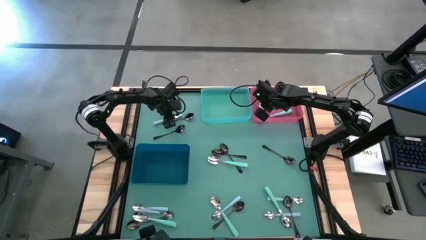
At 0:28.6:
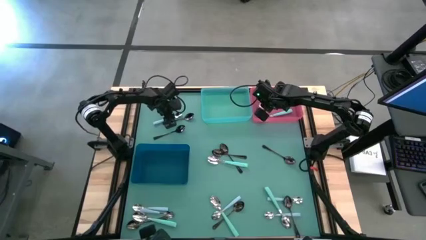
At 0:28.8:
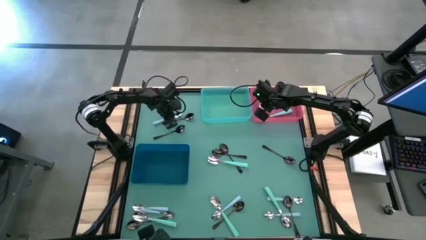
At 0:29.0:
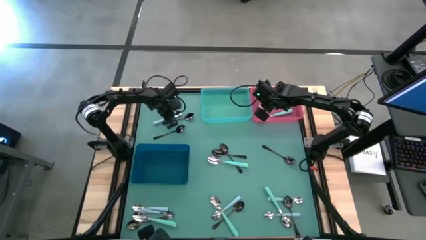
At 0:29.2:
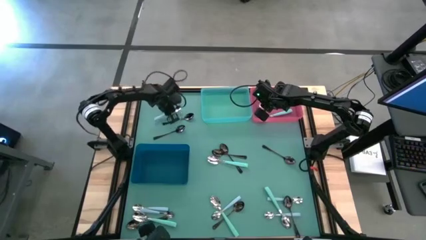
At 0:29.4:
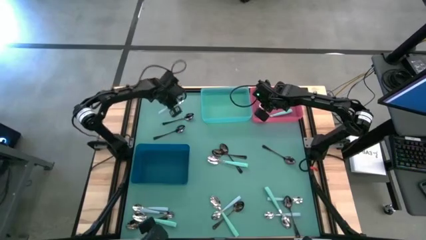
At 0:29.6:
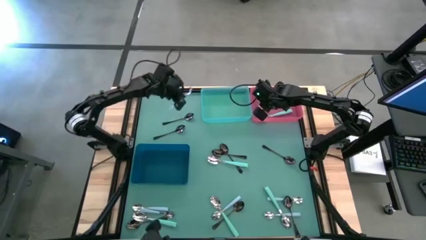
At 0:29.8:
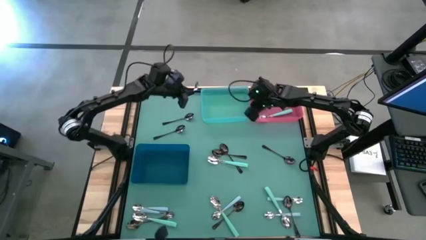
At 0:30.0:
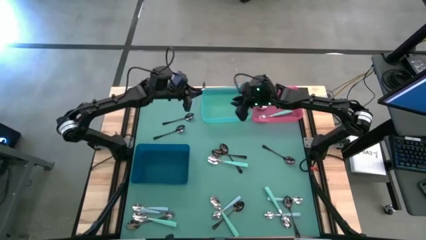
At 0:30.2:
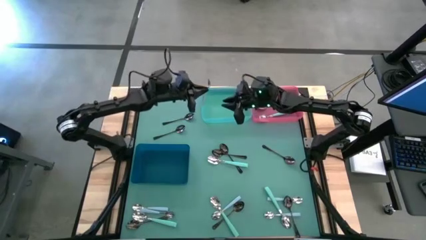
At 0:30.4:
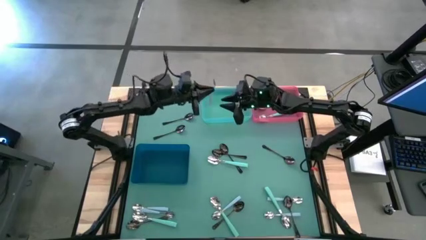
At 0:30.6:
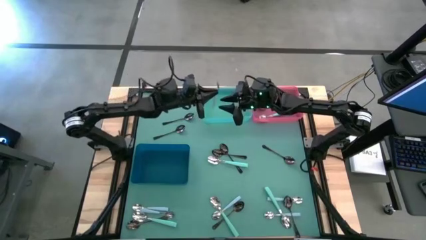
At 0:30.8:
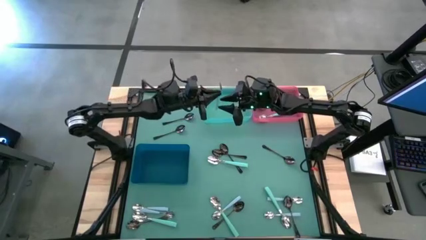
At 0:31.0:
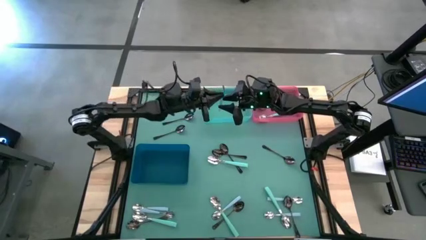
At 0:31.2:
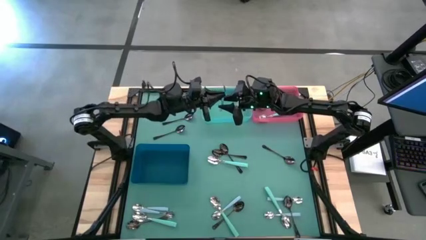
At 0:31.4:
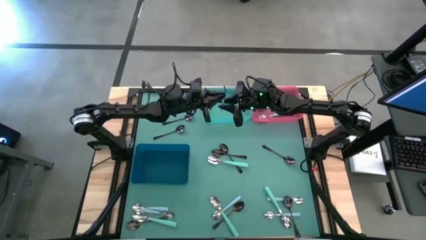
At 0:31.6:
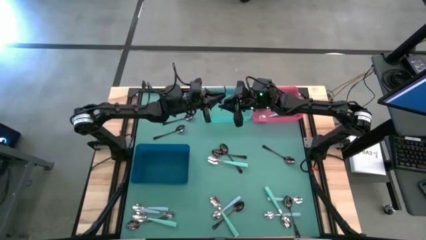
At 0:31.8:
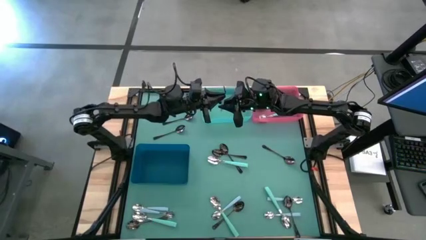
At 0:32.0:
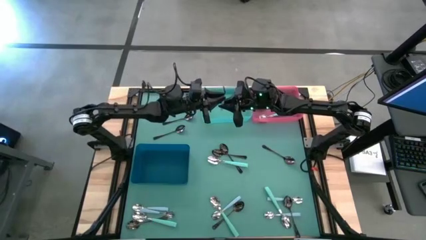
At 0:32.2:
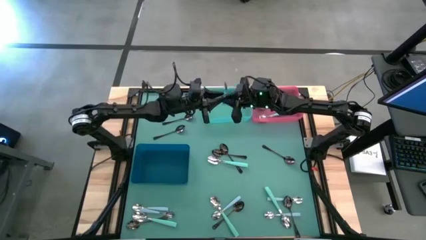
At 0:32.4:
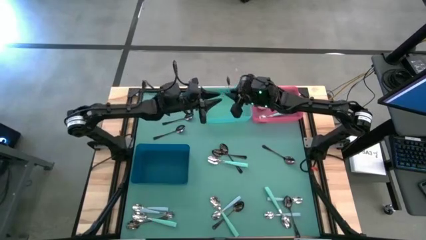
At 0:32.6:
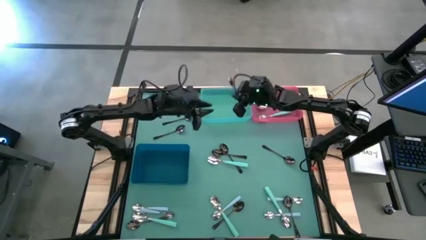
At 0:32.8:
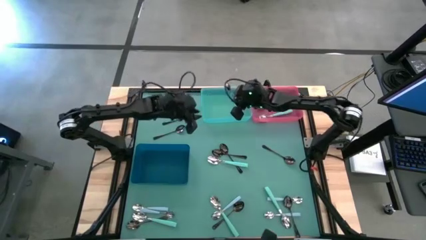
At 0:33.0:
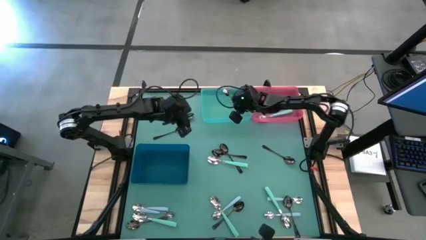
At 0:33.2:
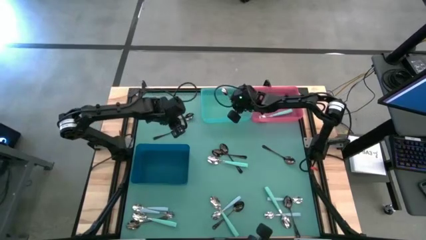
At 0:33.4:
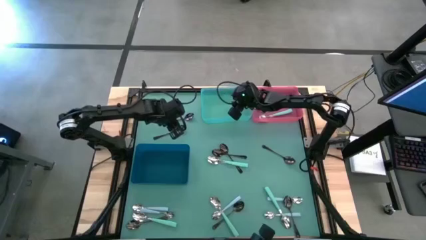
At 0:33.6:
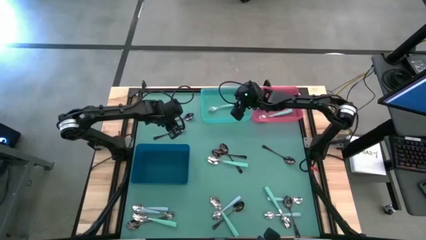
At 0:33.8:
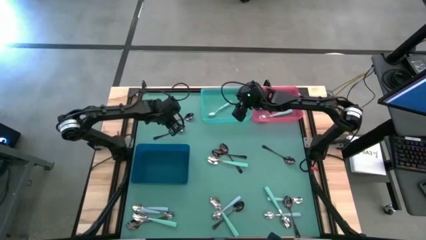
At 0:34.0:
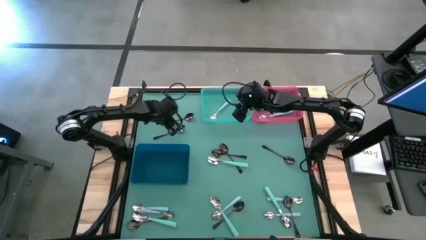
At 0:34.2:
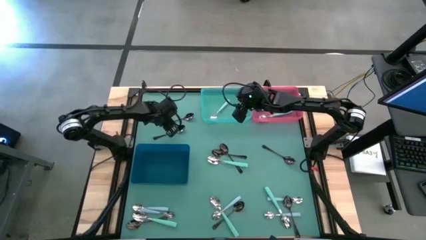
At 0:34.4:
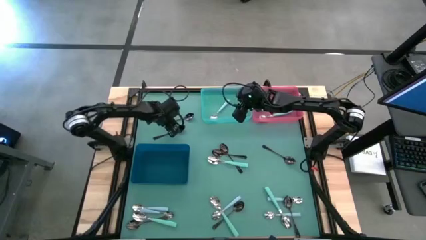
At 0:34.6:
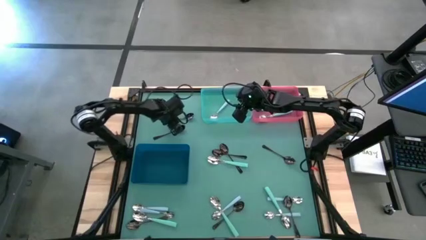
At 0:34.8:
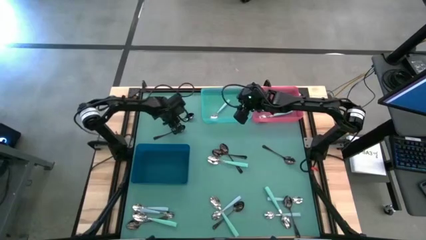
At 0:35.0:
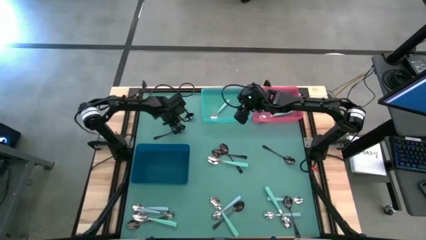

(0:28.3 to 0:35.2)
Task: Sort silverware by color (type)
Put the top left blue spoon into the light blue bin

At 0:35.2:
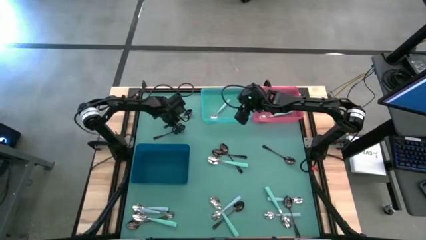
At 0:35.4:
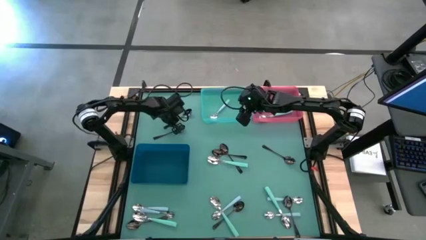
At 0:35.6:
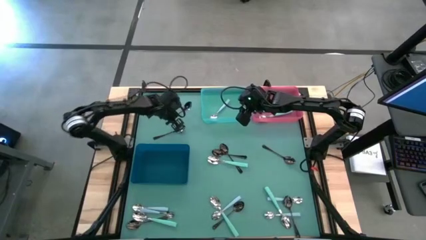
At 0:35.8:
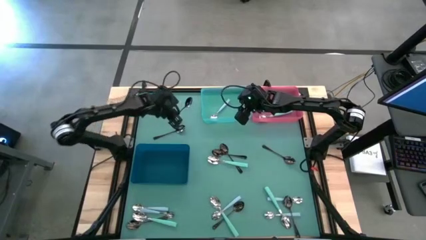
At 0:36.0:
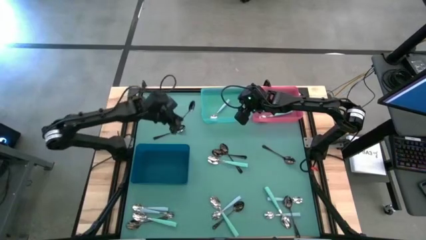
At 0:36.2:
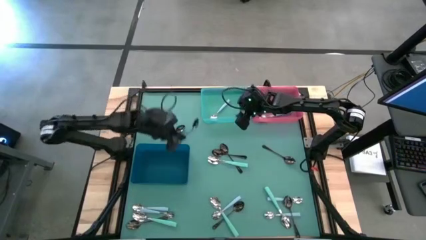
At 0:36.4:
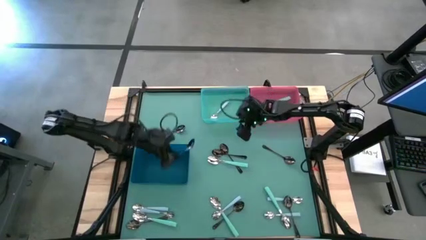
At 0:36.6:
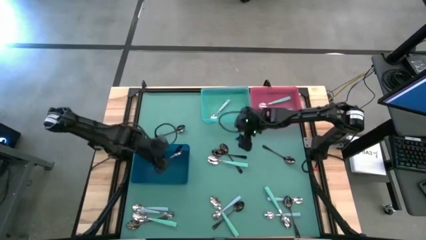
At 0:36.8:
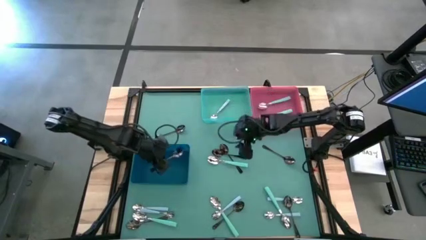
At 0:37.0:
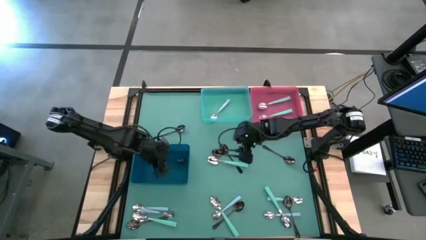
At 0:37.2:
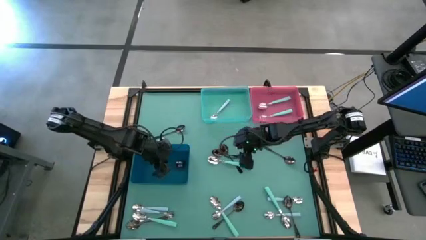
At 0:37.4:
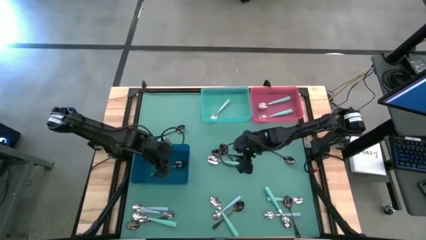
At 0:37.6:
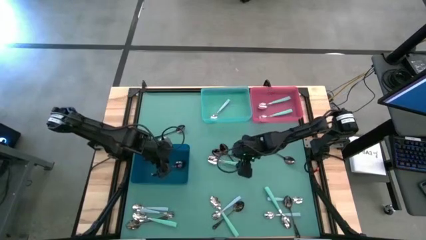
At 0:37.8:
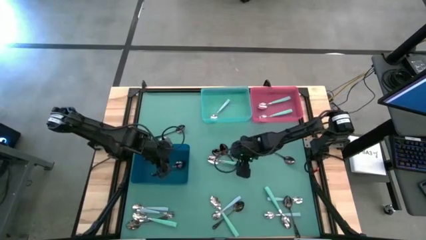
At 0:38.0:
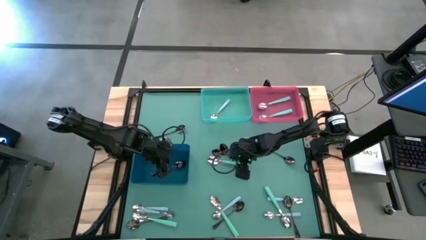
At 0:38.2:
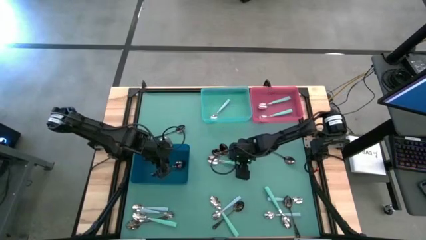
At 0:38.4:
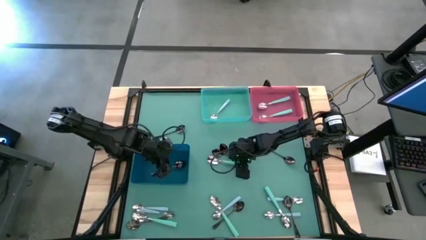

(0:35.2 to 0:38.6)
Put the top left black spoon into the dark blue bin

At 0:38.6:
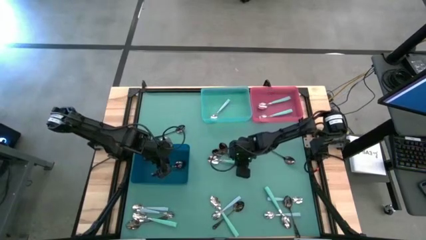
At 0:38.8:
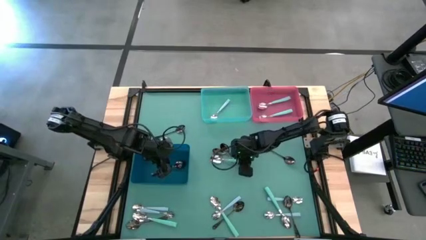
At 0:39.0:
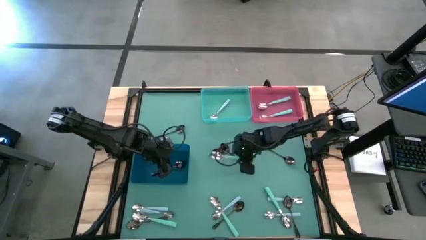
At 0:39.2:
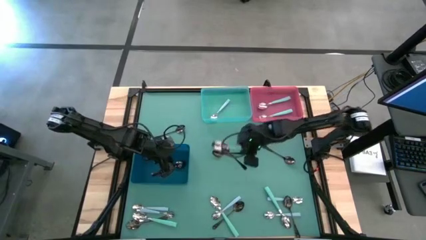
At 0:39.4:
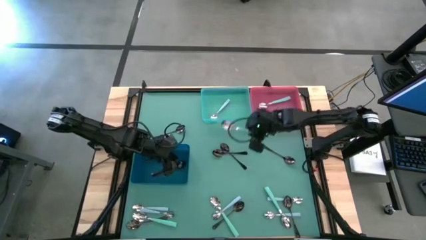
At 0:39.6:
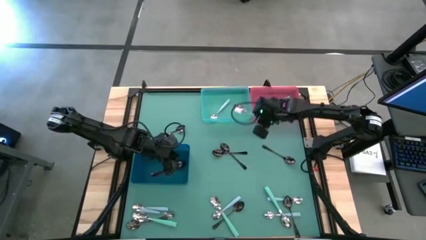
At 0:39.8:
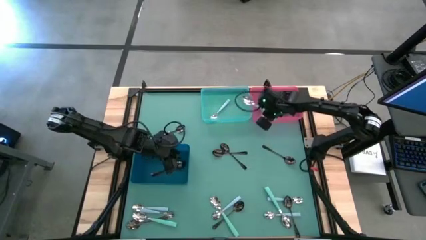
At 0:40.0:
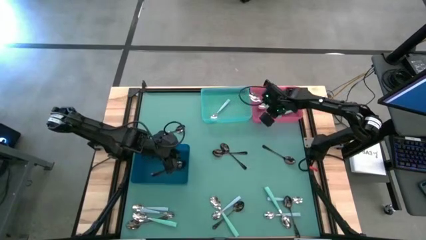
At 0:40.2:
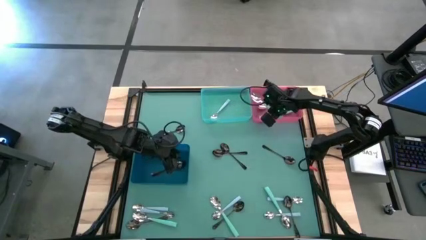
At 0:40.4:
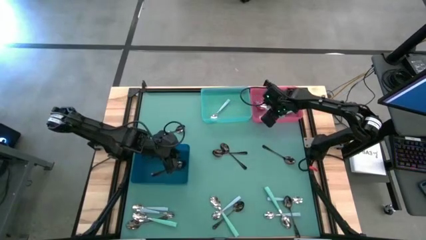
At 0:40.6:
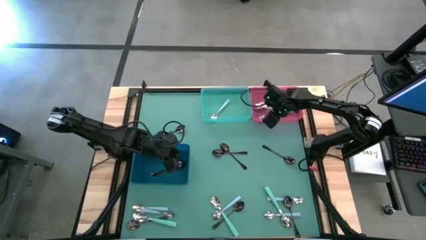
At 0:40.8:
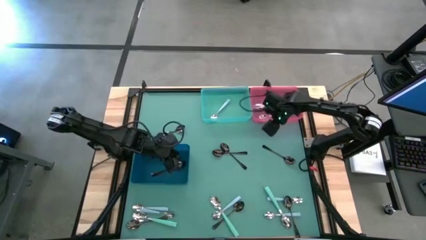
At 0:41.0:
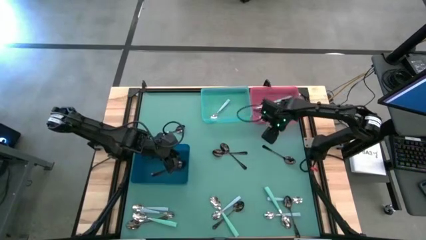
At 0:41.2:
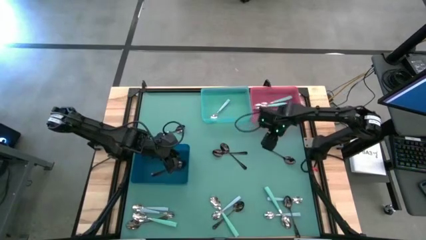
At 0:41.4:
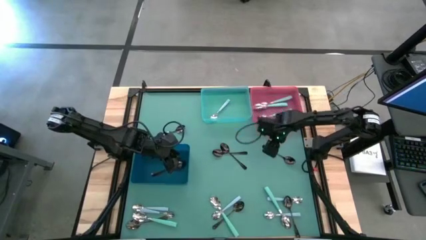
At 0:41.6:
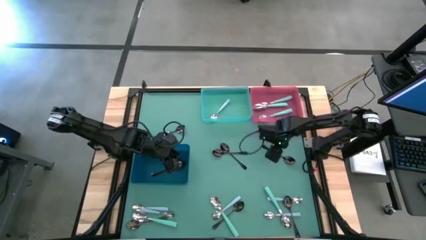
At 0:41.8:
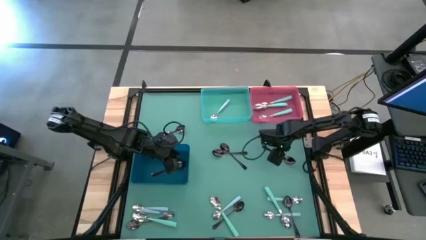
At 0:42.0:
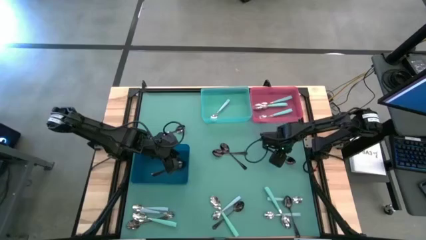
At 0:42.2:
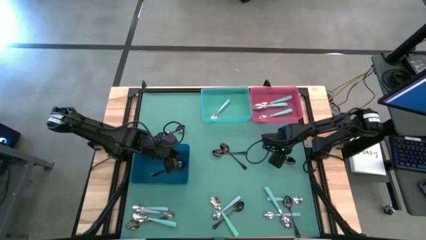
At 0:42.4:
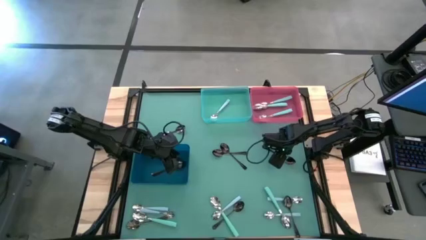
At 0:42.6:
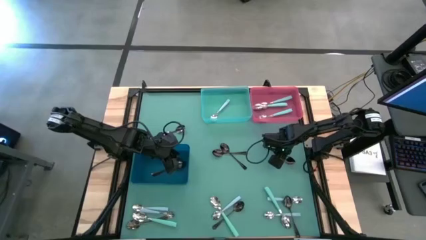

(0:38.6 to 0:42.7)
Put the top center green spoon into the red bin
